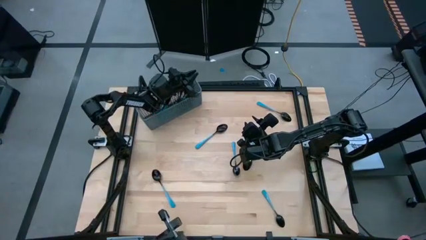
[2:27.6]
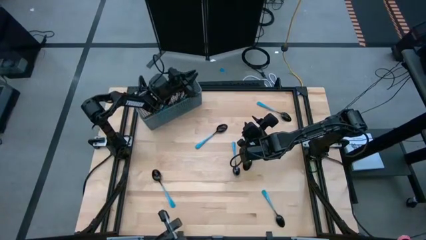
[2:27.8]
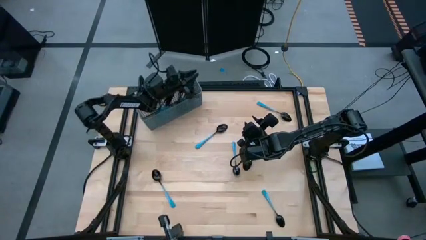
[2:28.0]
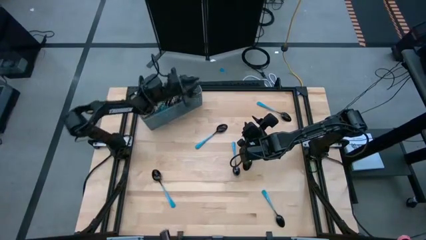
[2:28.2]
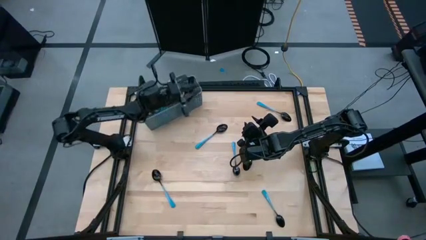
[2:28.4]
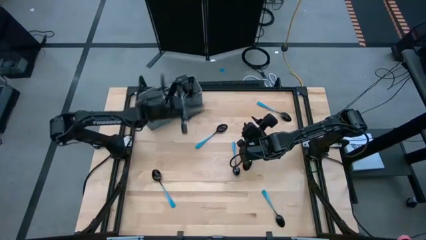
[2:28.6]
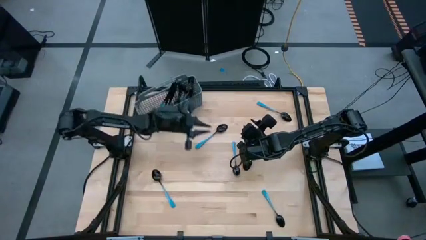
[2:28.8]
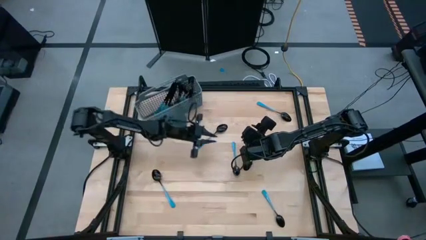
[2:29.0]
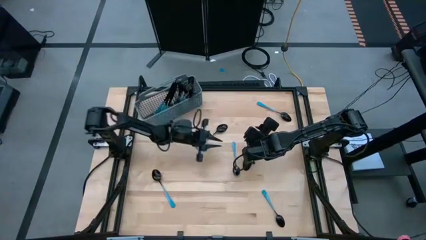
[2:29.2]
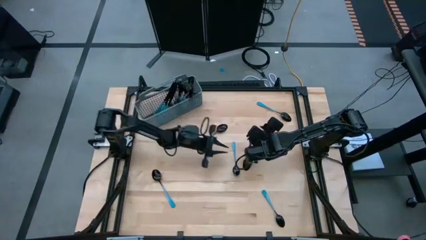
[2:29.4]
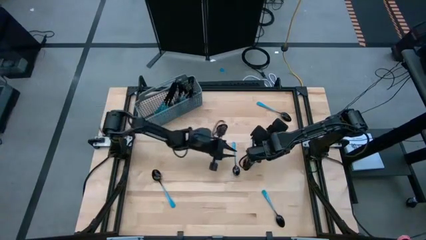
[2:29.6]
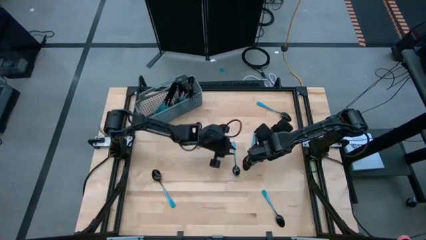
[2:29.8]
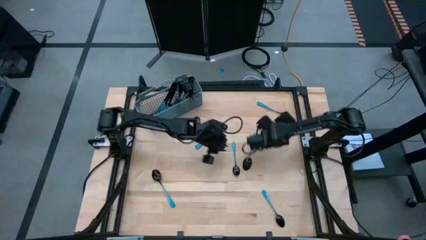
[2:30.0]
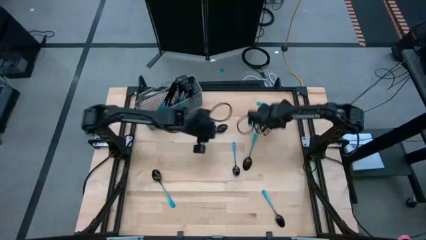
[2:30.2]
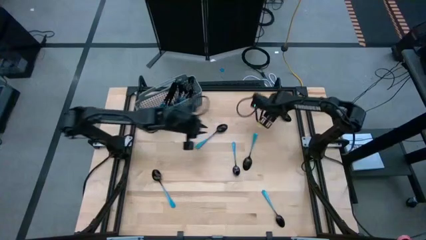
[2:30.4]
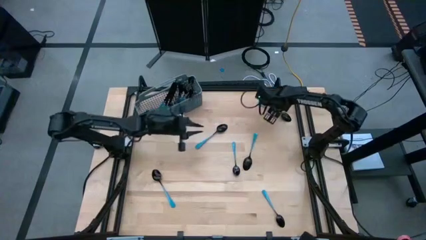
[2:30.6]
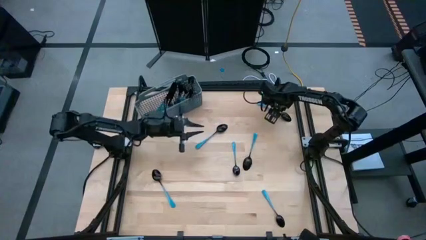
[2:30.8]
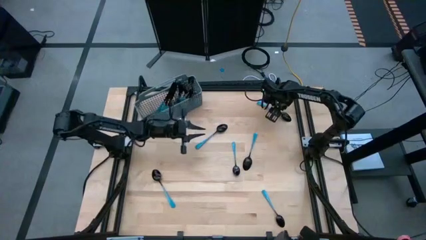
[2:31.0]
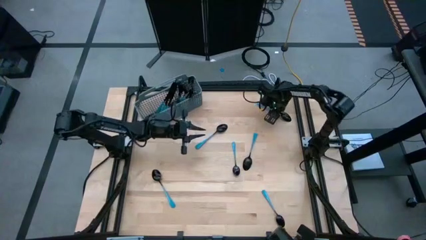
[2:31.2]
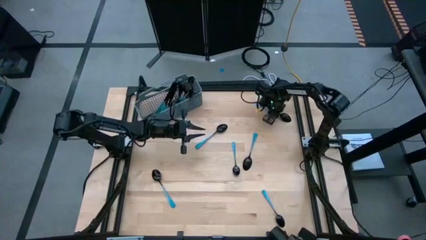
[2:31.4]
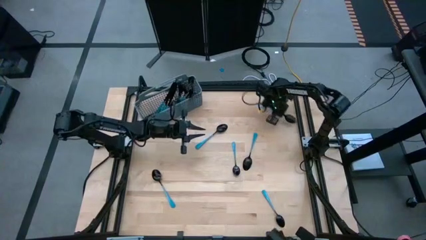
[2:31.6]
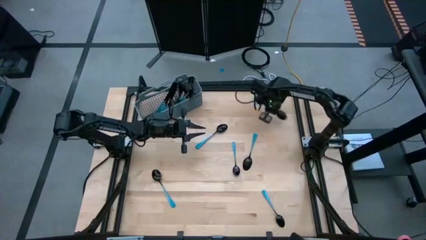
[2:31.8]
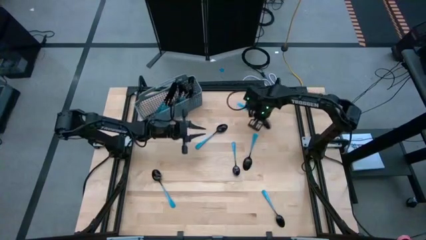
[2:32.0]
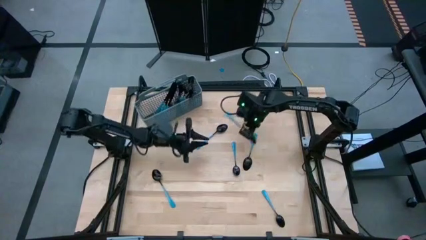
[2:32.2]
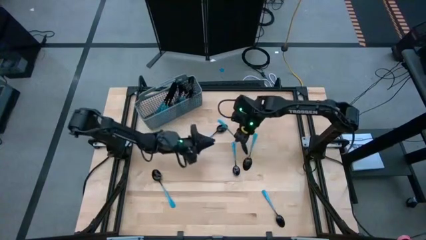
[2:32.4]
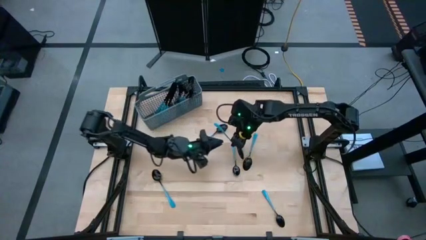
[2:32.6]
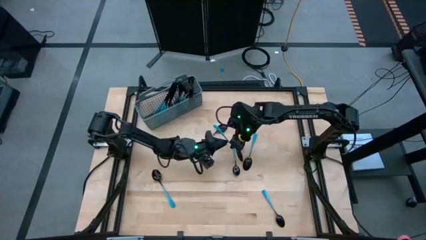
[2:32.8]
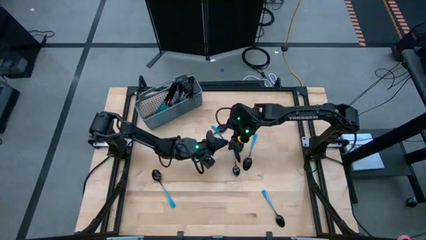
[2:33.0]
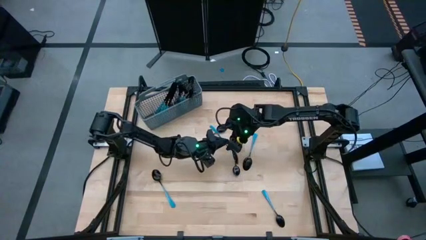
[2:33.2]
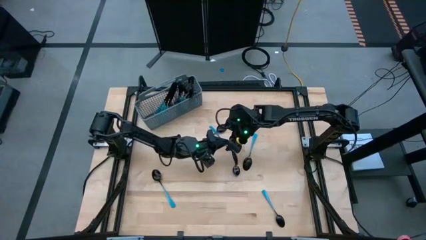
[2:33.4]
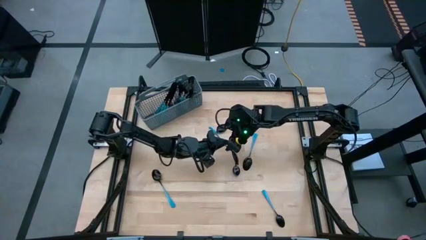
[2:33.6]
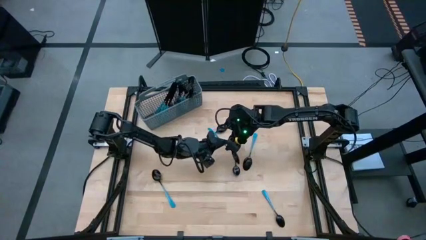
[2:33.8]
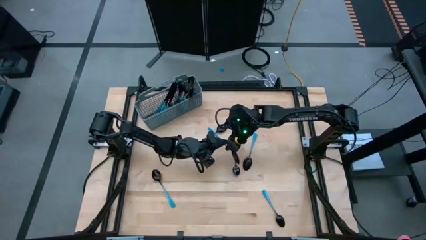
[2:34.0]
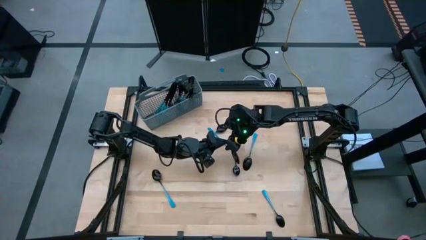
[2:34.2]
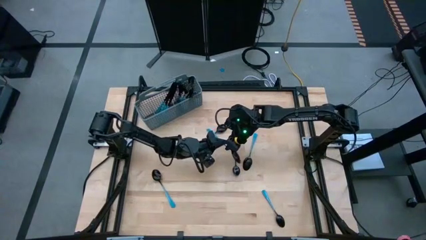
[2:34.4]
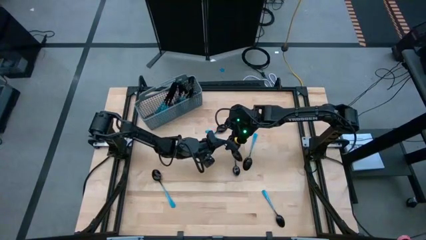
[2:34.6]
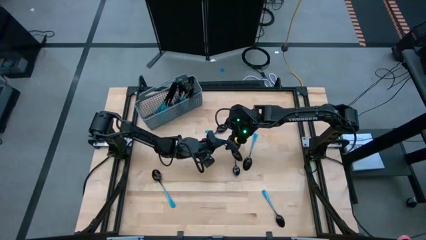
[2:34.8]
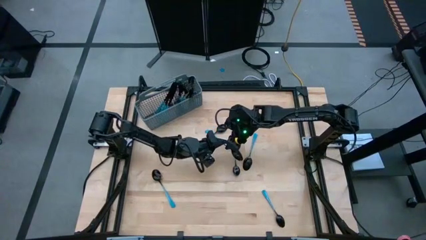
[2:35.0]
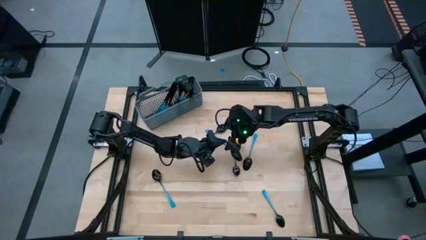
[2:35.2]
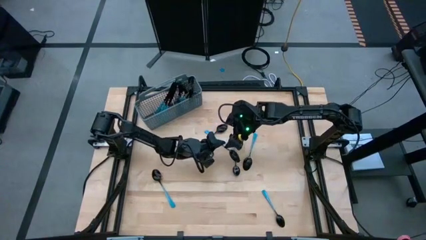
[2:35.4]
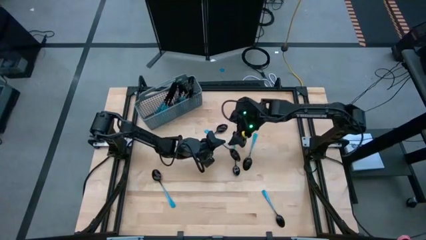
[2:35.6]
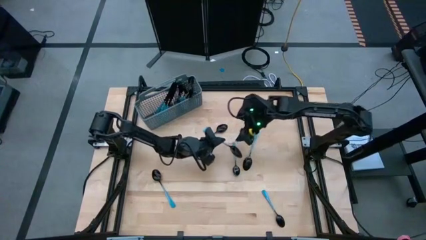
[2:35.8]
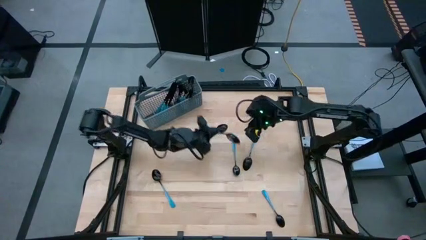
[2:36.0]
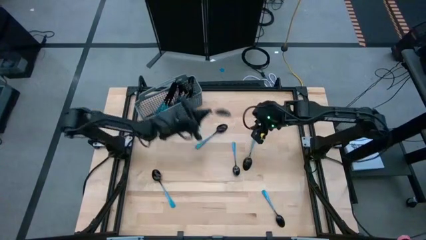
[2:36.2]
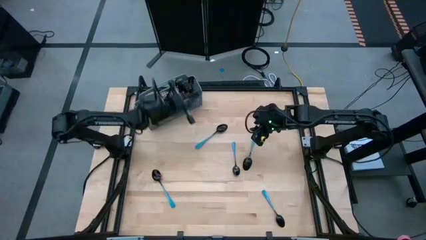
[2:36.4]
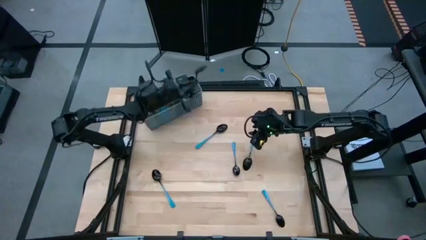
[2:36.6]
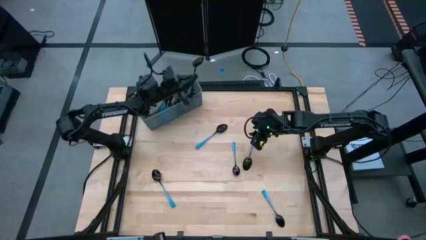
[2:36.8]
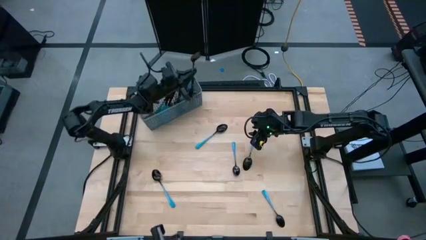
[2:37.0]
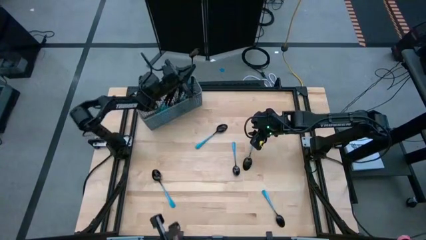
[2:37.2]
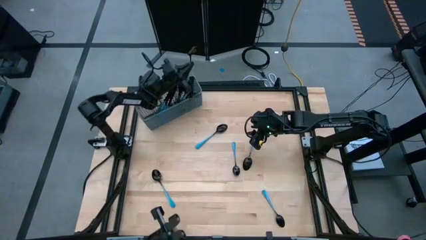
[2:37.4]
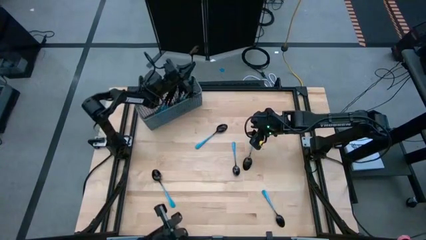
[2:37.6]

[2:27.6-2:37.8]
Task: Sort silverware
Put the blue spoon in the silverware rack

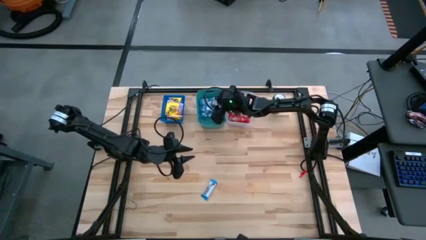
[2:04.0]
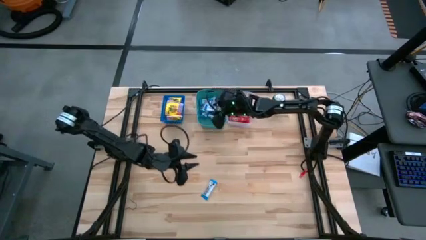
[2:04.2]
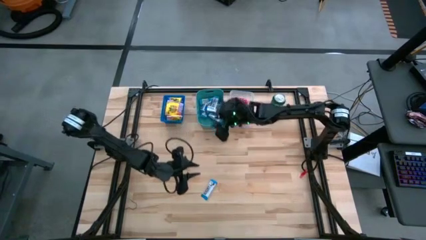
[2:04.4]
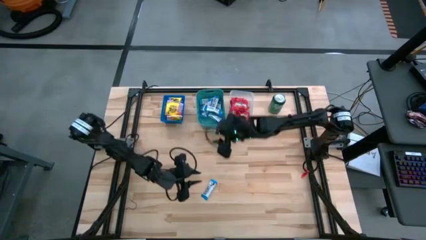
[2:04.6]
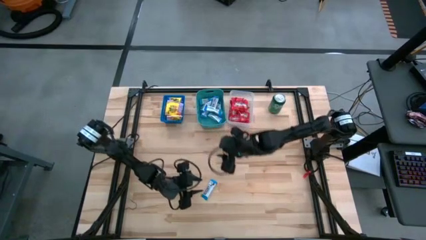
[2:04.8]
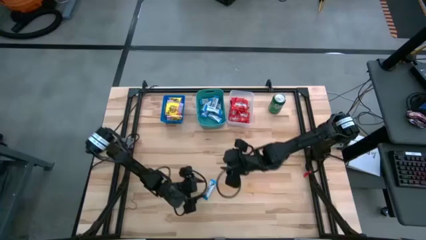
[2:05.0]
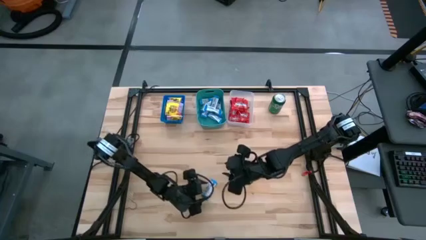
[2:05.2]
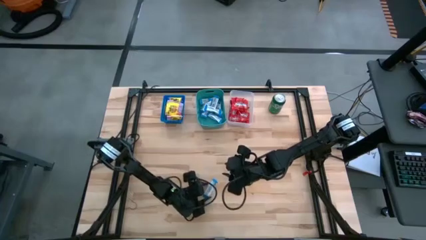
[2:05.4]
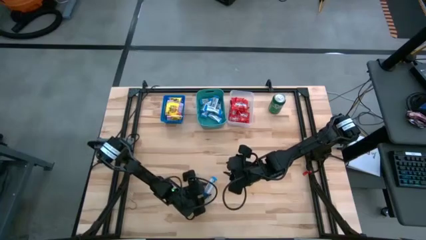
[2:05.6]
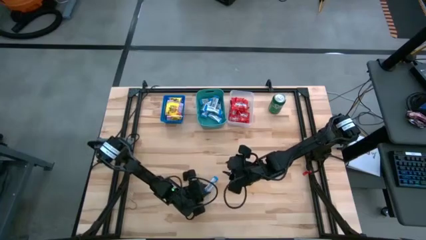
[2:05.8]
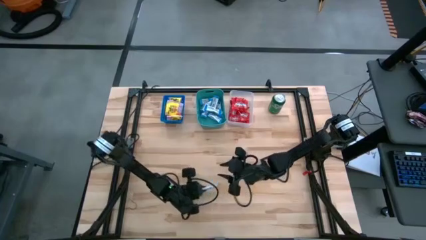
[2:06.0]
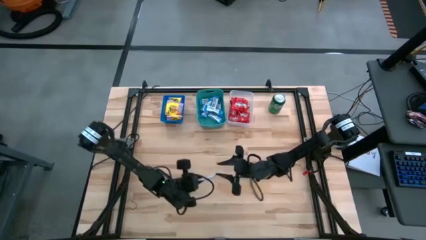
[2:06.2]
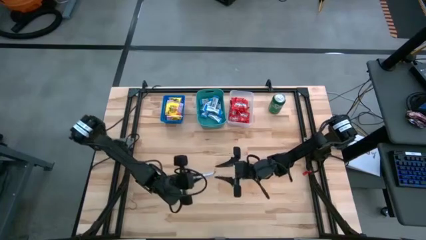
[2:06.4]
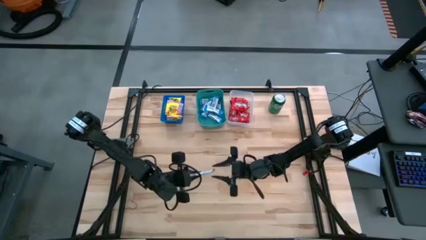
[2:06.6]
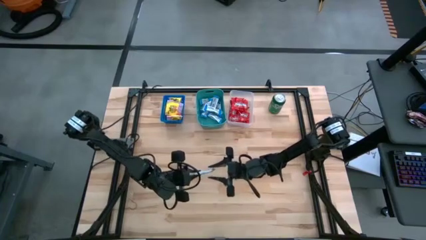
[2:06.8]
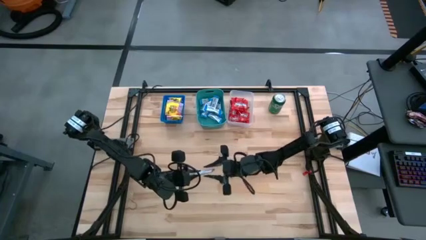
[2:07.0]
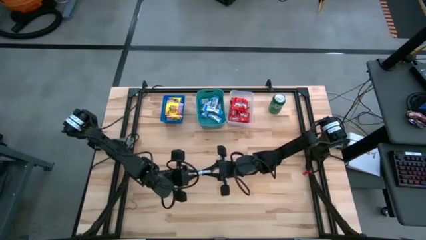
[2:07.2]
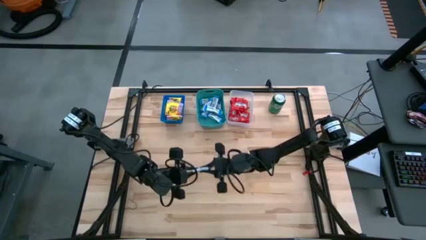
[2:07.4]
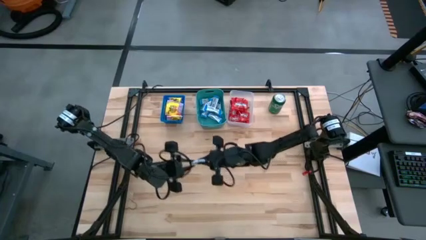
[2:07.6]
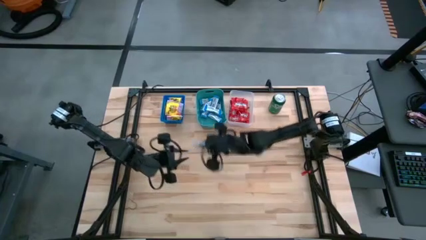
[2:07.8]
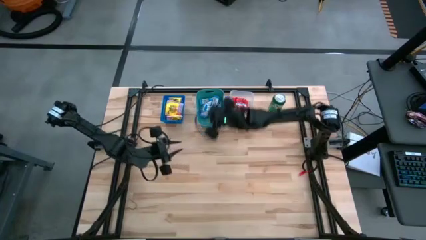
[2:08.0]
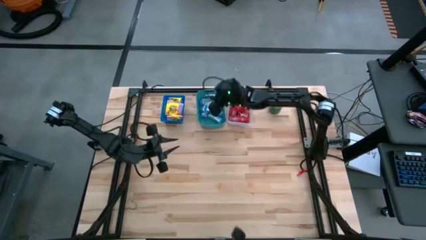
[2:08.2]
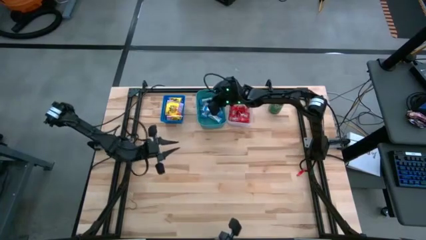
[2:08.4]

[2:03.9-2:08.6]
Task: Sort candy
Put the white chocolate bar into the green bin
